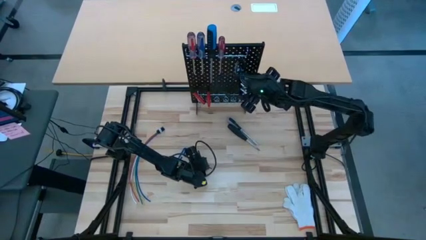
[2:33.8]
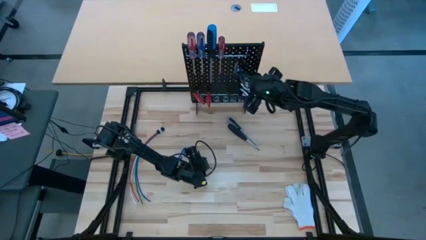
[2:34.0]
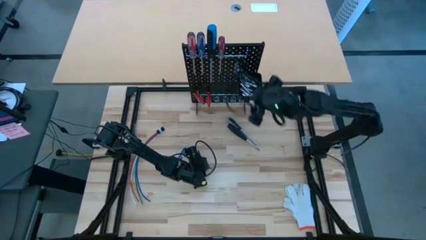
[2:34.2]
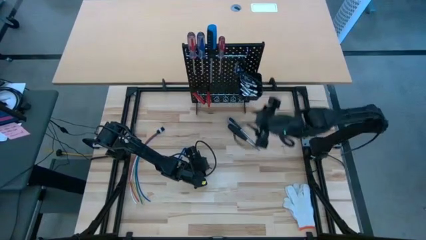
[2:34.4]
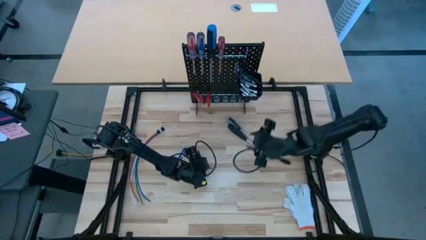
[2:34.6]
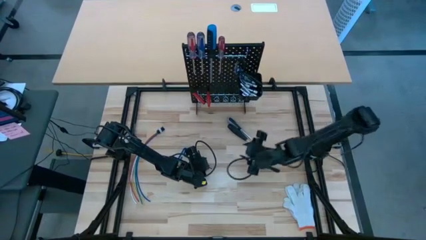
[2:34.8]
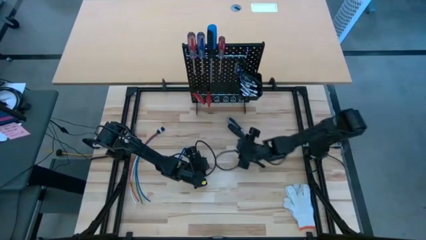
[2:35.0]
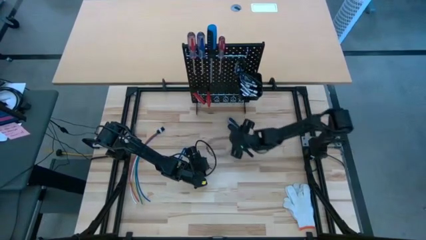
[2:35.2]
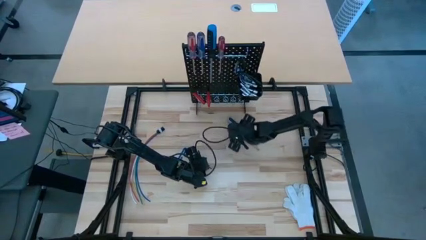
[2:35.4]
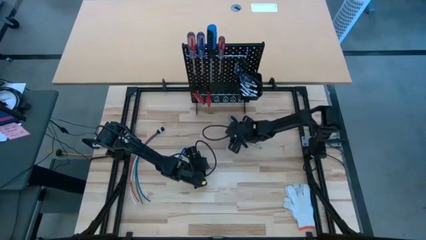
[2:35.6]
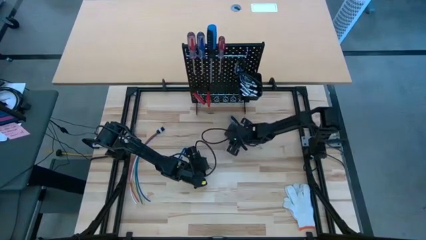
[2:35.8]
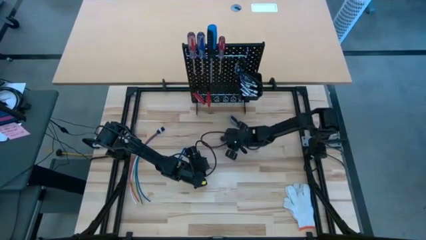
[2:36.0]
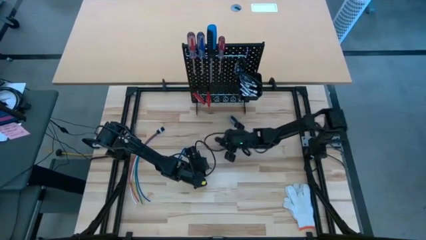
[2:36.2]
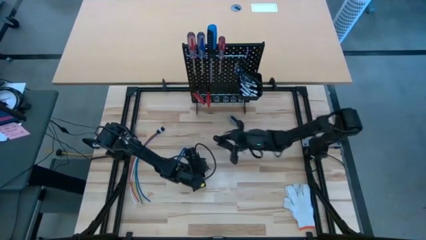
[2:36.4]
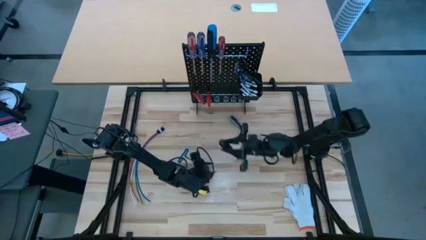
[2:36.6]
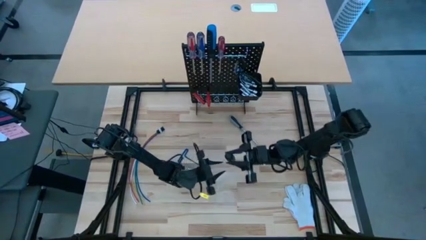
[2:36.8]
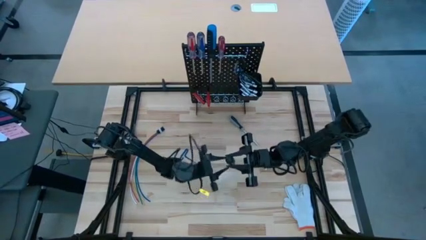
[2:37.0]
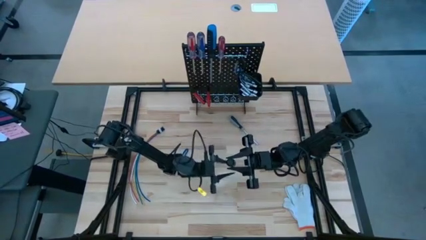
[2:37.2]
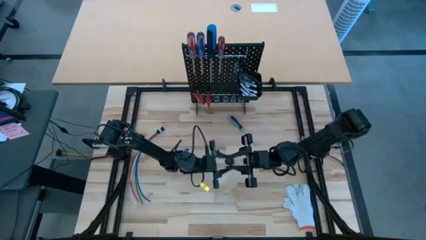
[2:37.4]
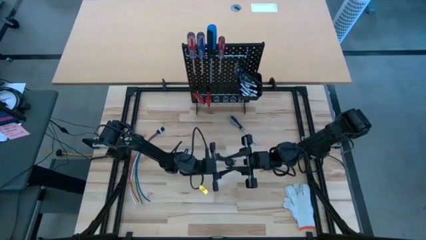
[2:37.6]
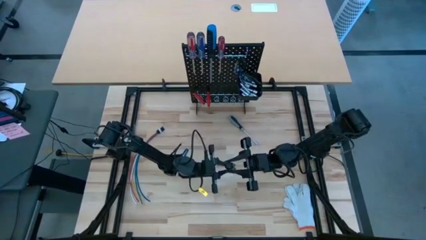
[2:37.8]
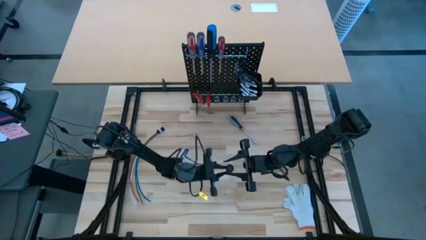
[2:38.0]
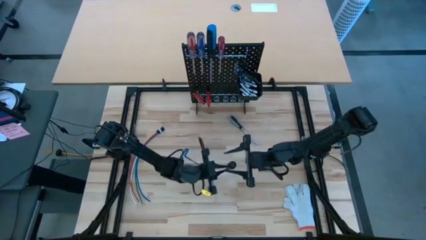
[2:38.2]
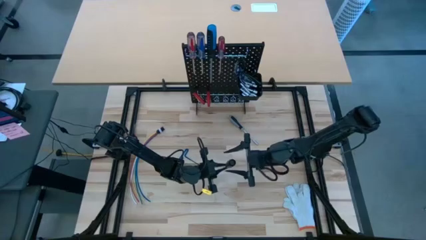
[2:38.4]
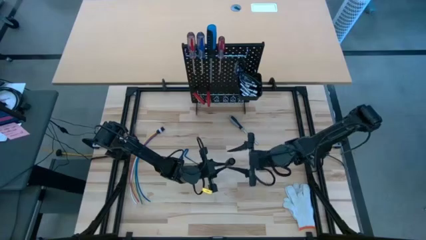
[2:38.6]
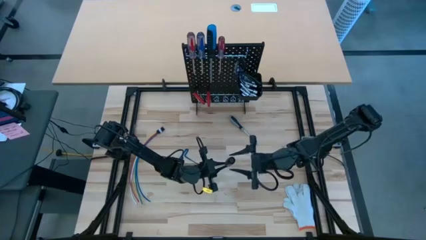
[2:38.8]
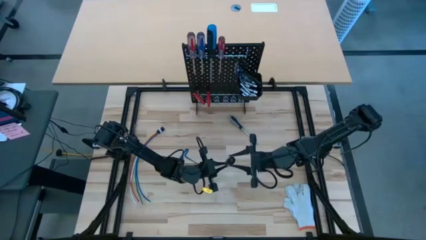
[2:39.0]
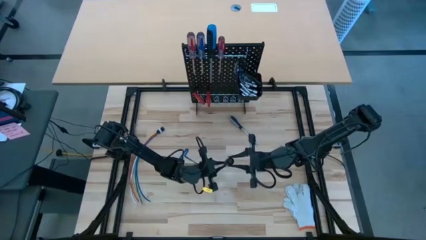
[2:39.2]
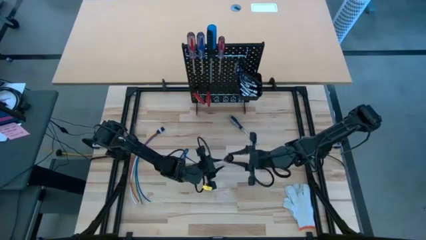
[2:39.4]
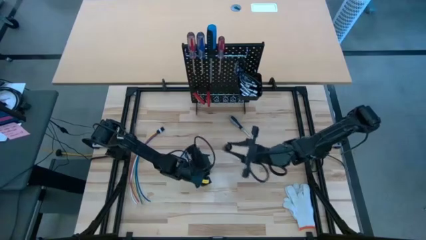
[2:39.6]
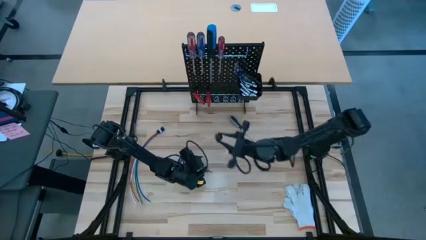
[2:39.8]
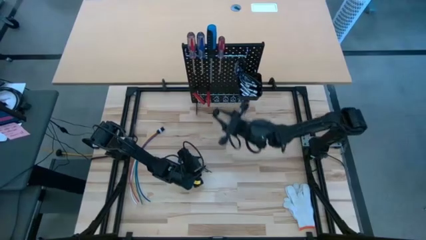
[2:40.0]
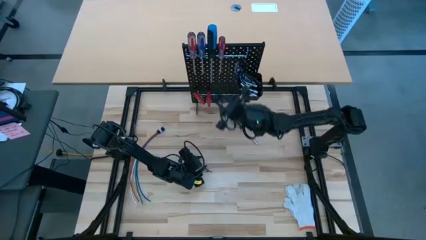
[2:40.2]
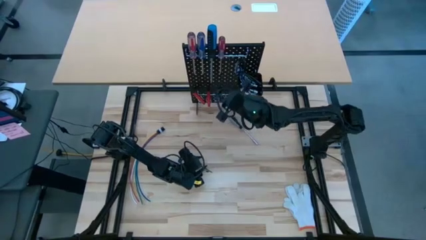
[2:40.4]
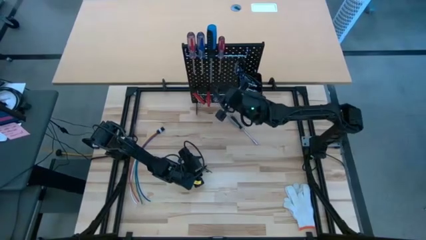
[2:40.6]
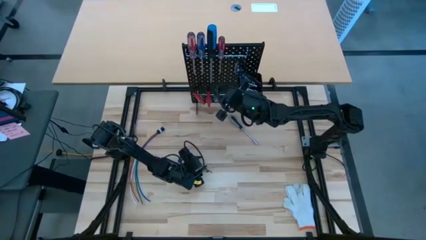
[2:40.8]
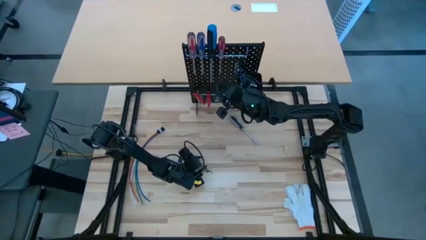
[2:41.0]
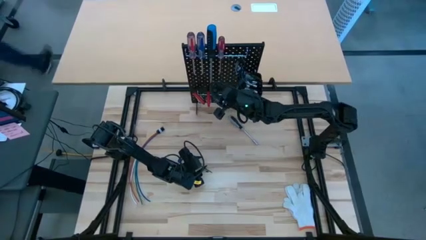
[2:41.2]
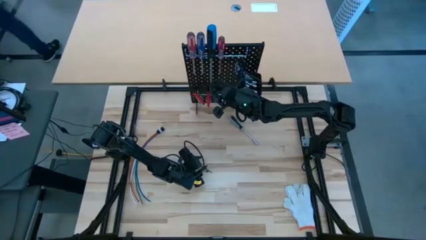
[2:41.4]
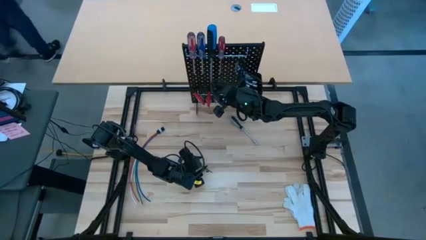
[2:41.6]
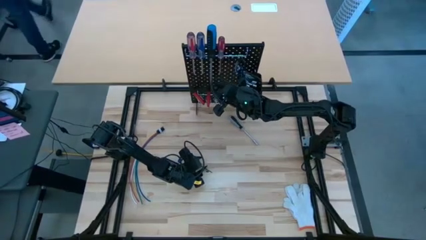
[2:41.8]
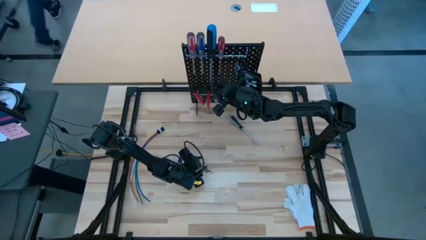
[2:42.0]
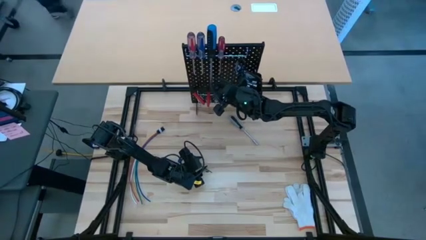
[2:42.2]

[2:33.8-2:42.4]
Task: Hang tools onto peg board
Hang the black screwdriver on the pegboard

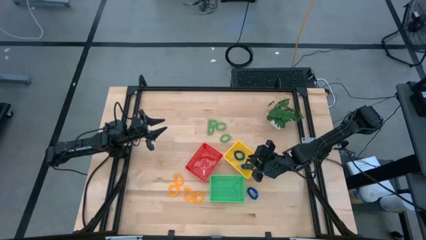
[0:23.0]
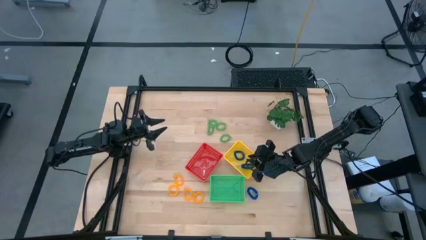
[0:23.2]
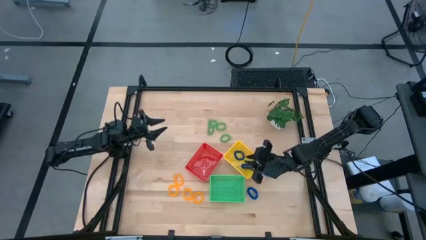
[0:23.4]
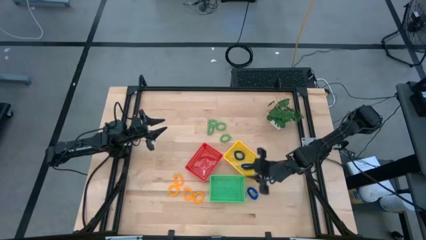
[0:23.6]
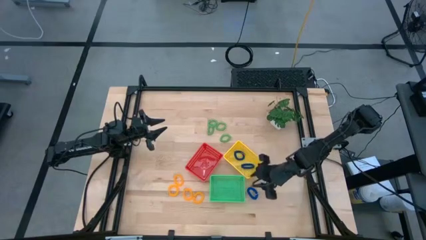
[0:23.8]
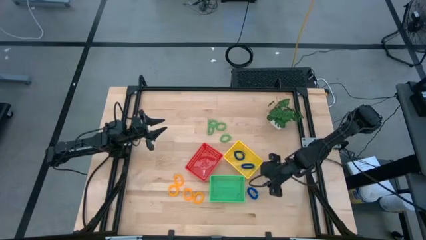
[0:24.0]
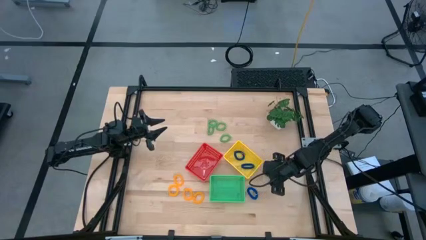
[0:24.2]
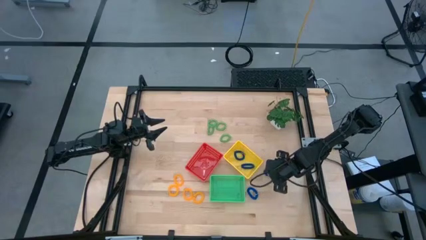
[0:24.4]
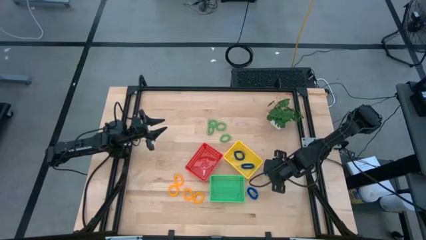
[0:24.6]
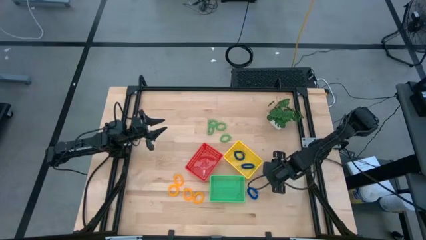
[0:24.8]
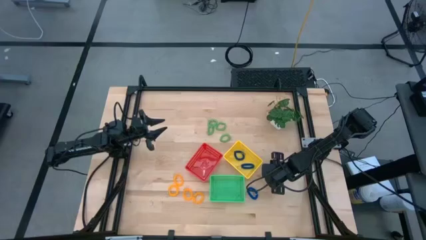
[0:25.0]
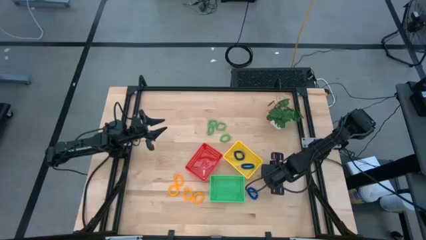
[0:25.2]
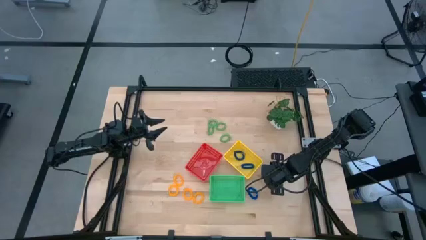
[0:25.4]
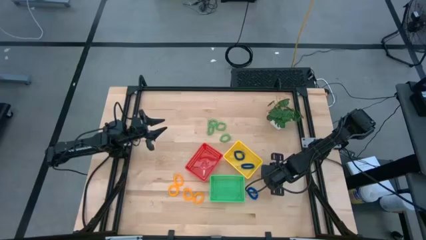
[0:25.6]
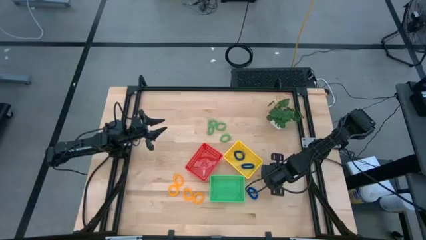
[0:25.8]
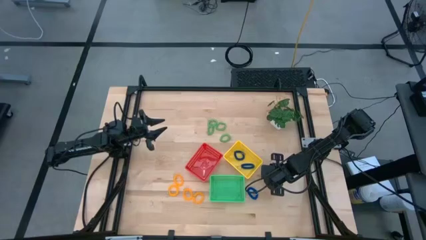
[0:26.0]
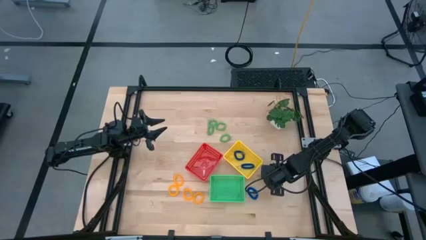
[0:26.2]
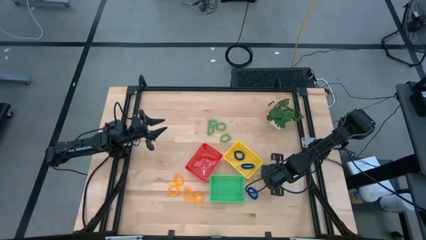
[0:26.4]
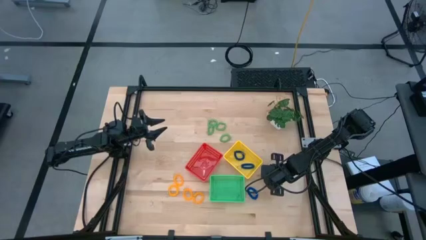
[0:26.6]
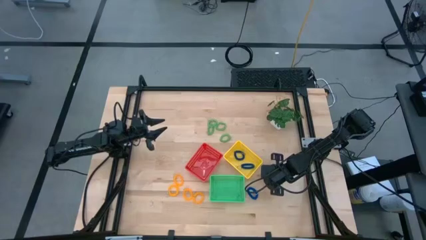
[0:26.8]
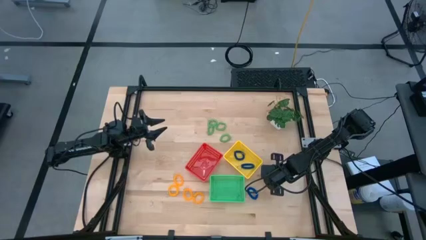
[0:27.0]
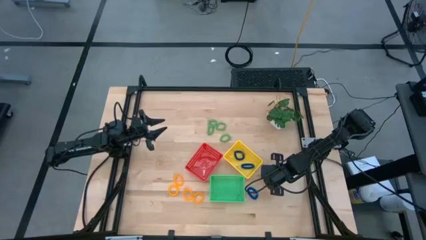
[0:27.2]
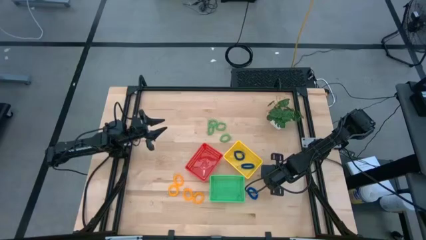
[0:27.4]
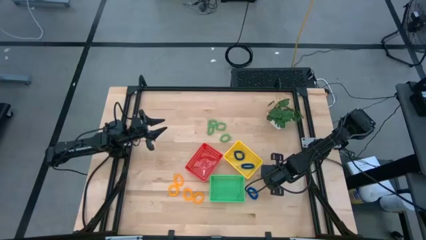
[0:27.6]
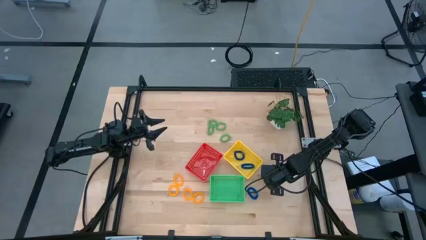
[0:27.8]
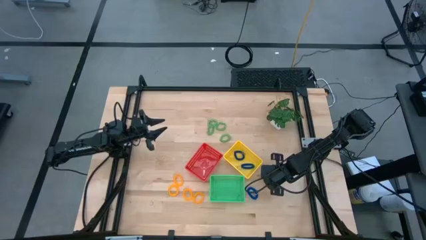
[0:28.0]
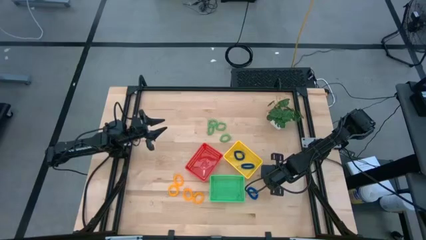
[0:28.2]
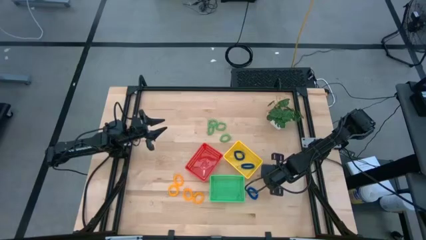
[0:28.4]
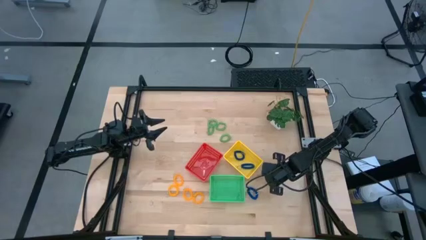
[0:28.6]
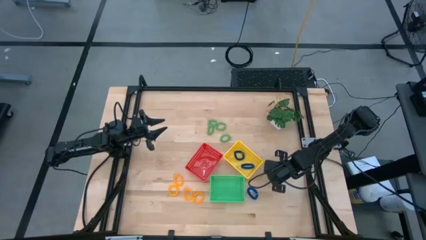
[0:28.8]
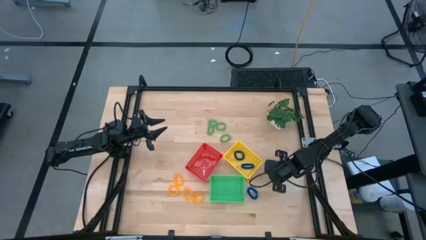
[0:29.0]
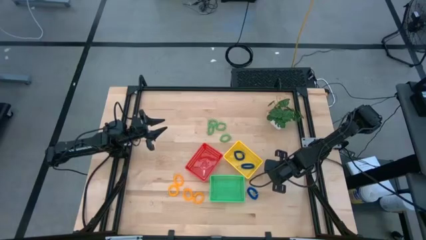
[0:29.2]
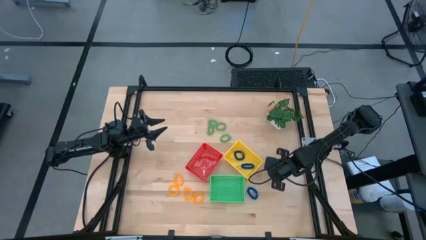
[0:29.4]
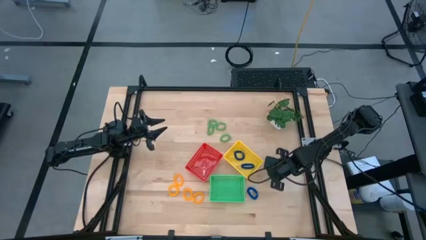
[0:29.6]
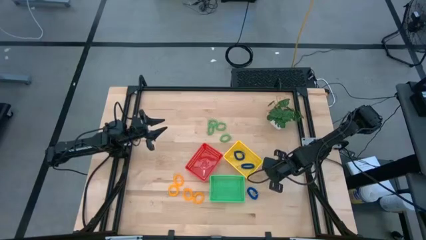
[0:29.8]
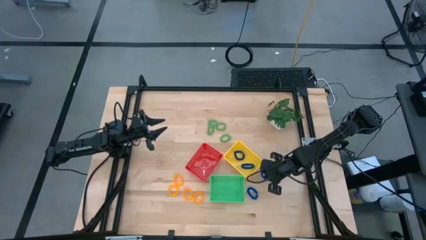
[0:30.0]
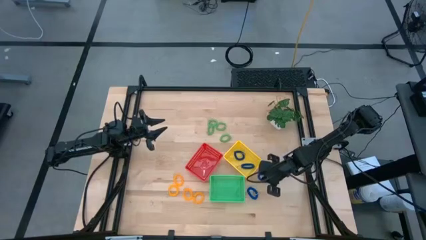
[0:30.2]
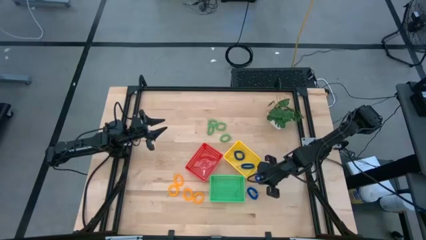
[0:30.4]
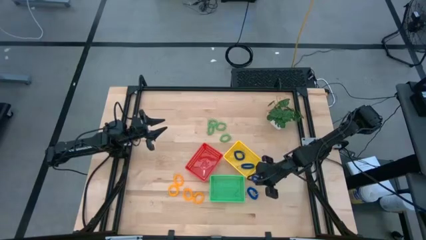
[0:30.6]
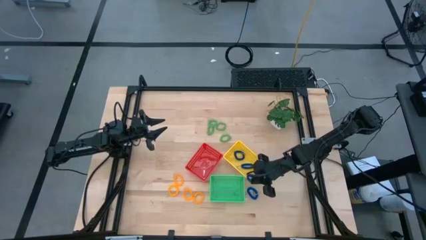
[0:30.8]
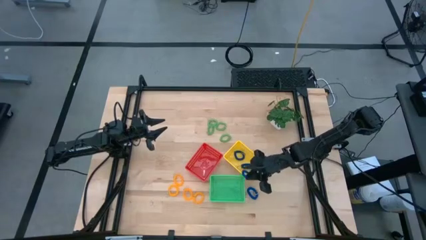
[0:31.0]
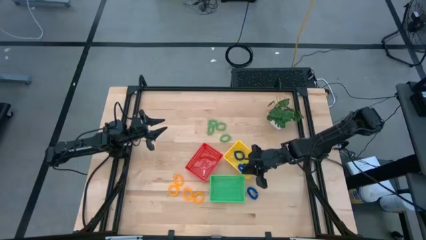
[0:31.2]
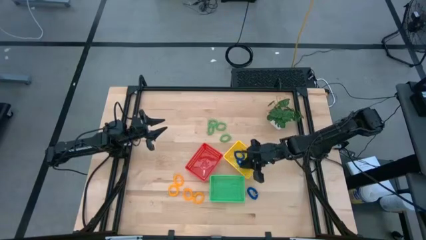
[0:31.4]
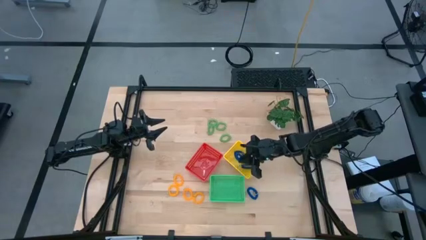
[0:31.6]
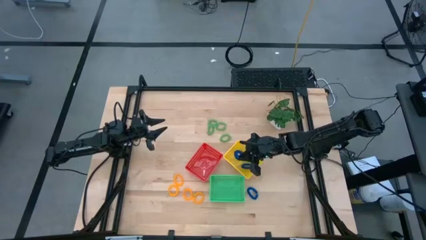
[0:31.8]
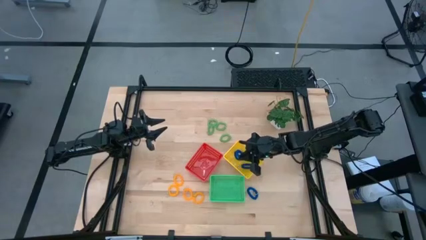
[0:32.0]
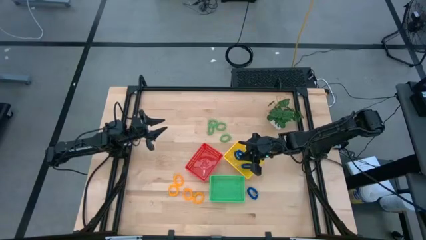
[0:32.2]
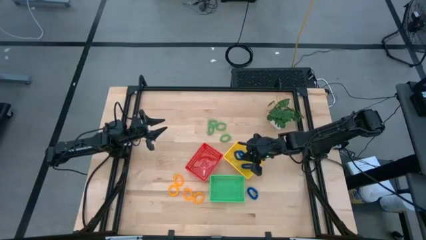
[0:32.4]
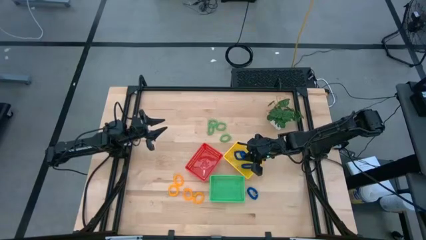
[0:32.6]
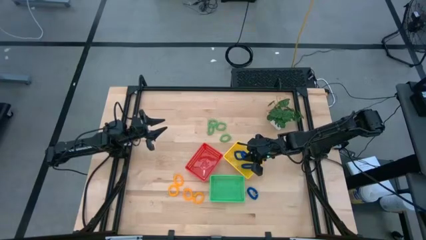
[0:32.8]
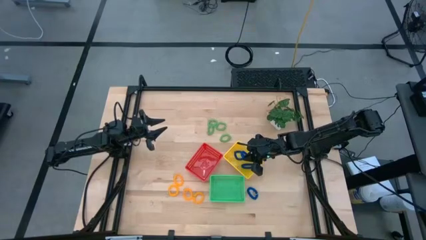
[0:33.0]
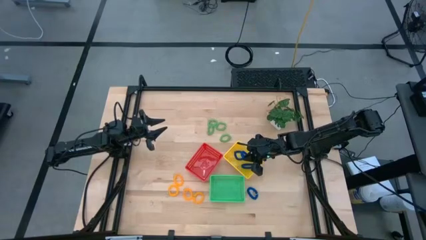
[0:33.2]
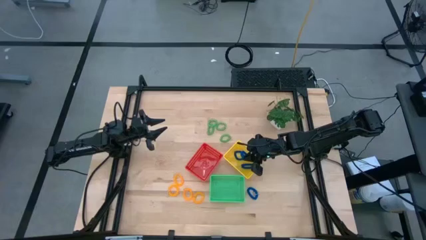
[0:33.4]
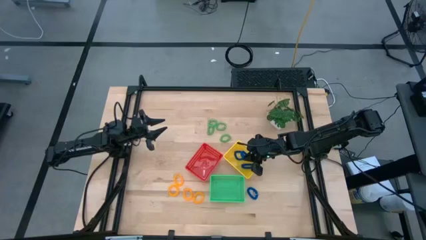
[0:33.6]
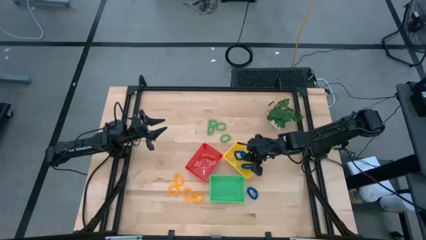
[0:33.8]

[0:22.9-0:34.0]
Task: Sort spring keychains
Put the blue spring keychain into the yellow bin
